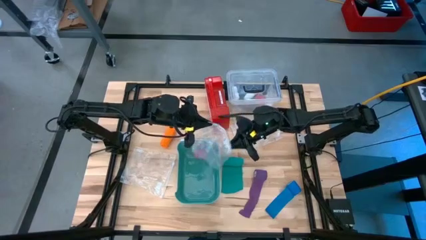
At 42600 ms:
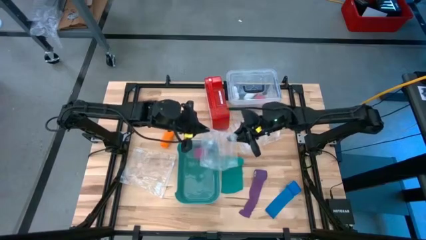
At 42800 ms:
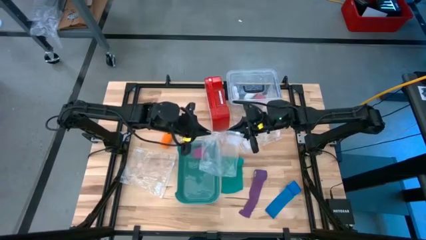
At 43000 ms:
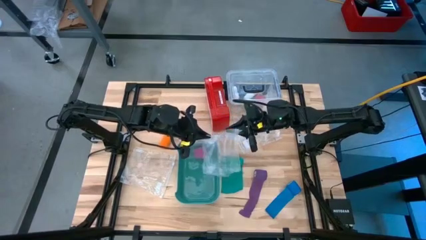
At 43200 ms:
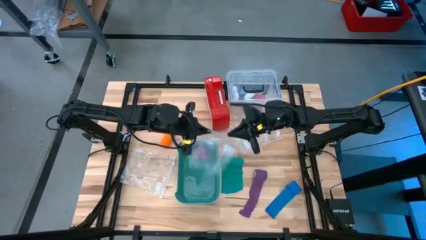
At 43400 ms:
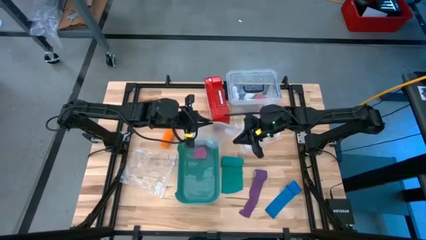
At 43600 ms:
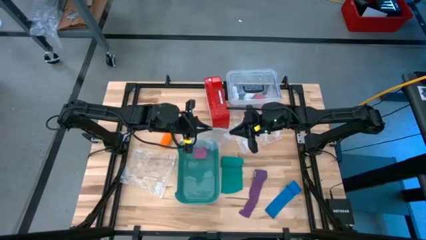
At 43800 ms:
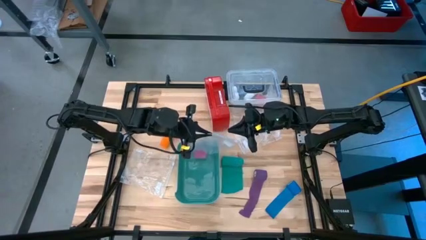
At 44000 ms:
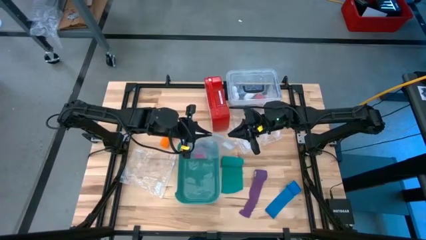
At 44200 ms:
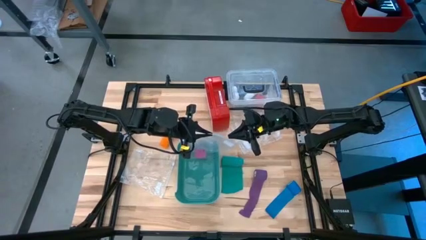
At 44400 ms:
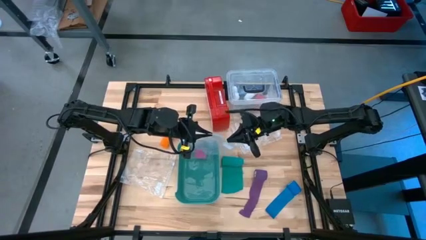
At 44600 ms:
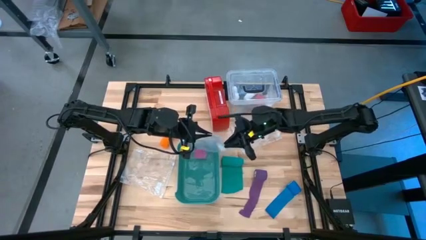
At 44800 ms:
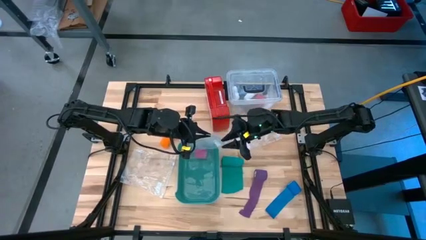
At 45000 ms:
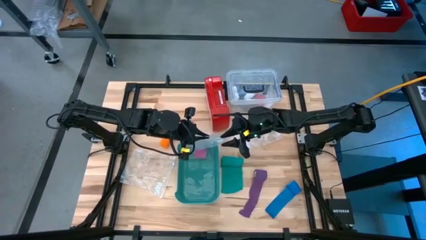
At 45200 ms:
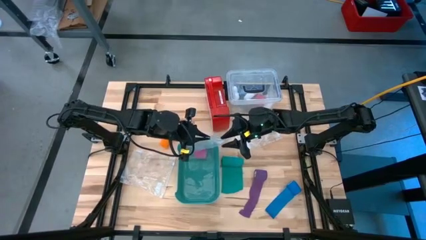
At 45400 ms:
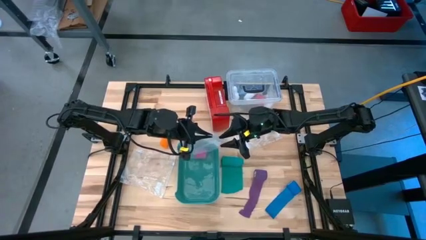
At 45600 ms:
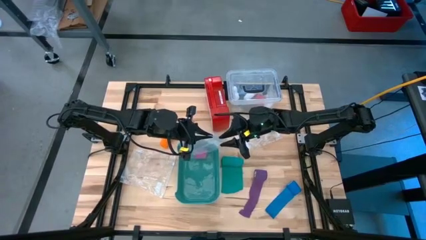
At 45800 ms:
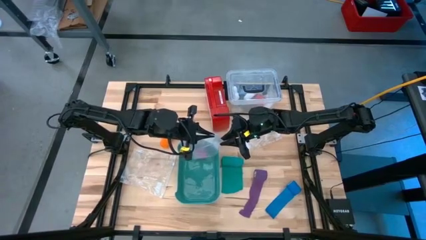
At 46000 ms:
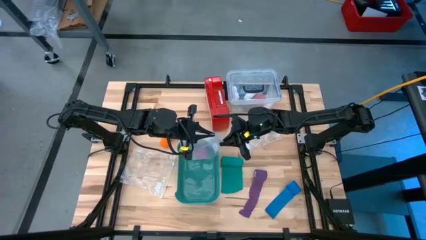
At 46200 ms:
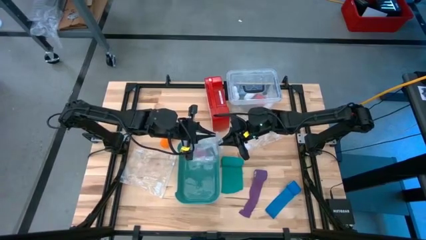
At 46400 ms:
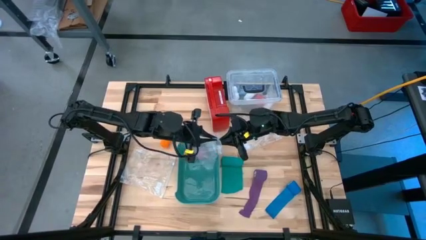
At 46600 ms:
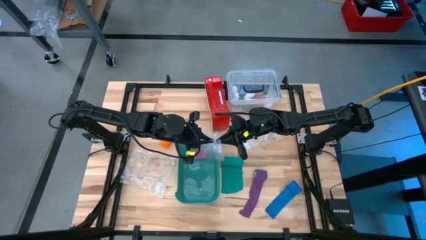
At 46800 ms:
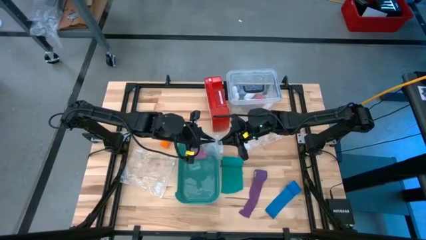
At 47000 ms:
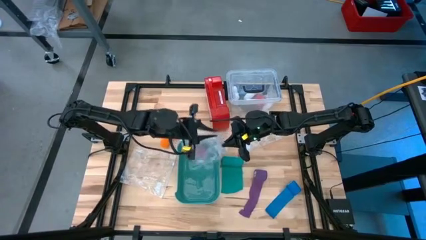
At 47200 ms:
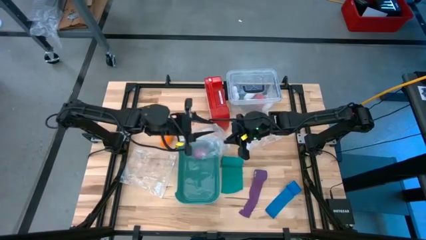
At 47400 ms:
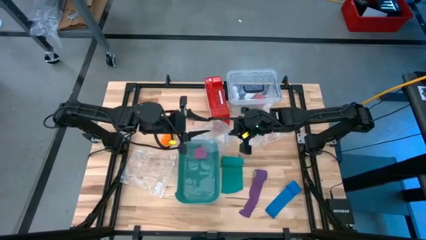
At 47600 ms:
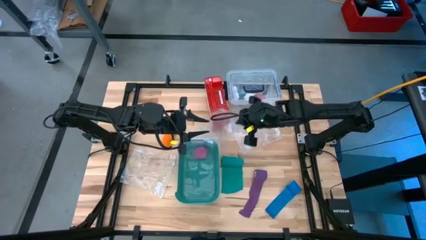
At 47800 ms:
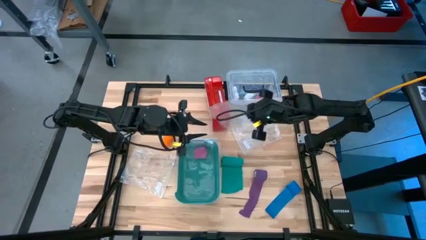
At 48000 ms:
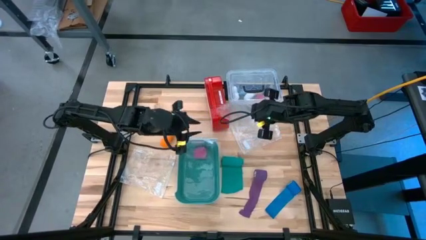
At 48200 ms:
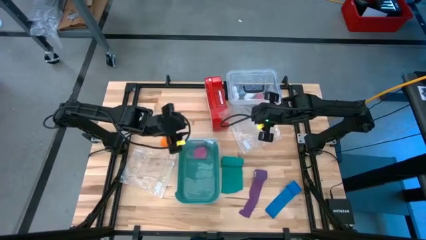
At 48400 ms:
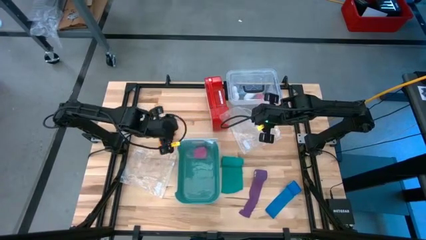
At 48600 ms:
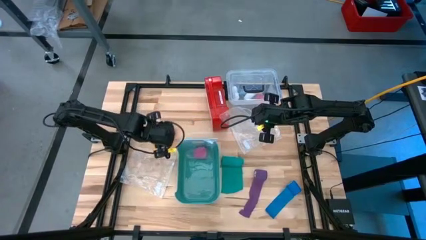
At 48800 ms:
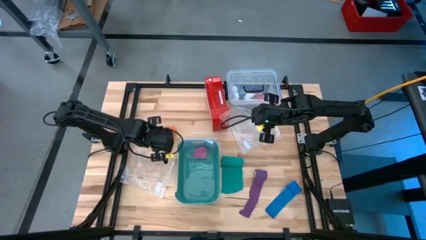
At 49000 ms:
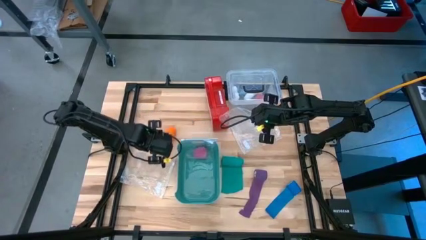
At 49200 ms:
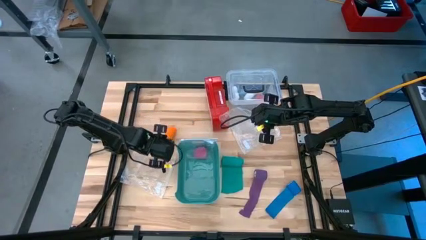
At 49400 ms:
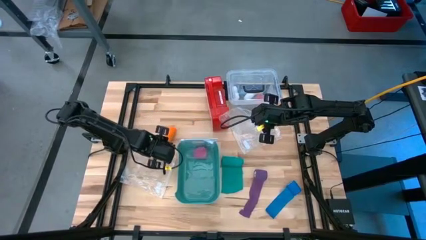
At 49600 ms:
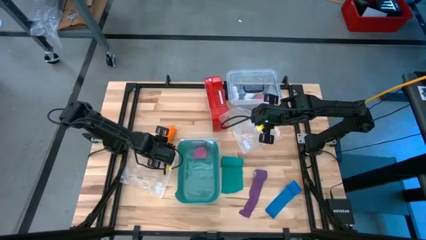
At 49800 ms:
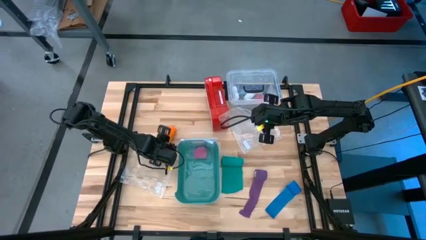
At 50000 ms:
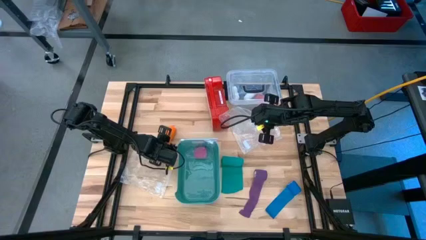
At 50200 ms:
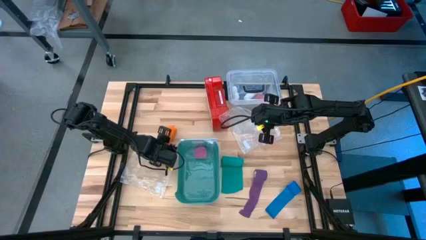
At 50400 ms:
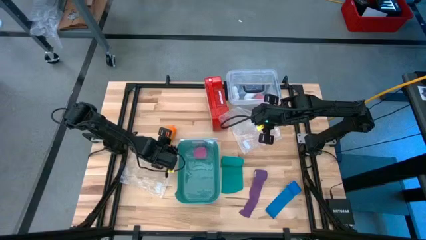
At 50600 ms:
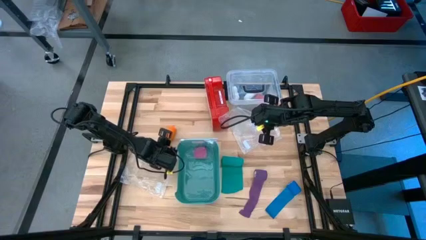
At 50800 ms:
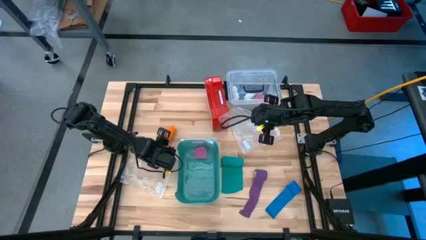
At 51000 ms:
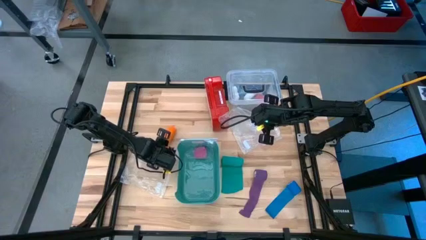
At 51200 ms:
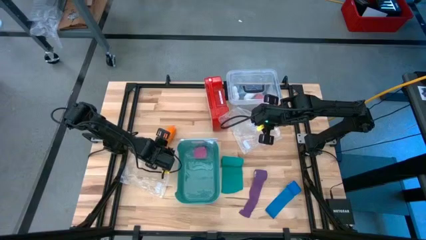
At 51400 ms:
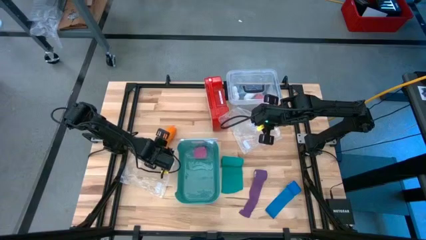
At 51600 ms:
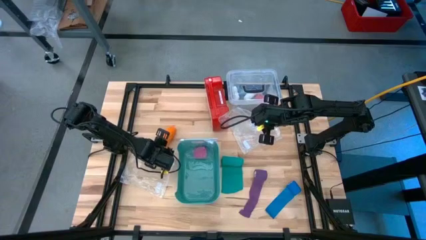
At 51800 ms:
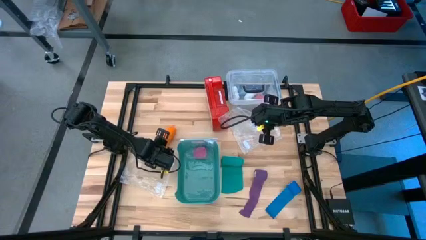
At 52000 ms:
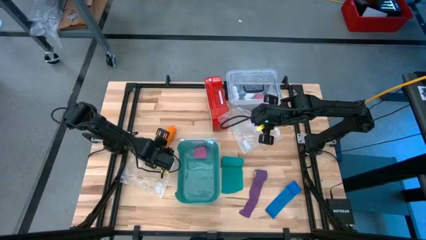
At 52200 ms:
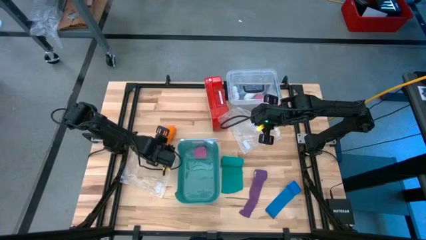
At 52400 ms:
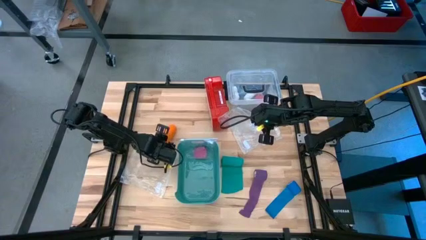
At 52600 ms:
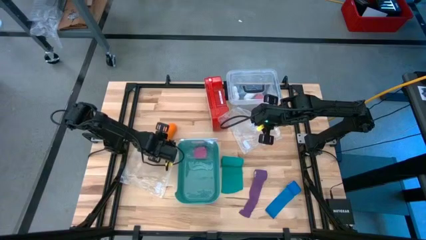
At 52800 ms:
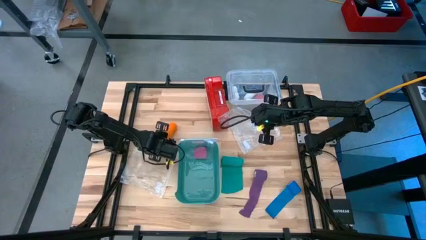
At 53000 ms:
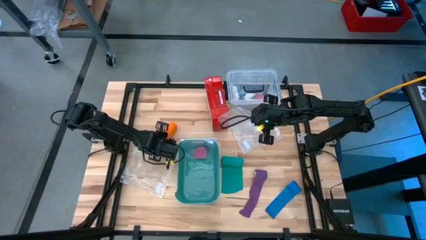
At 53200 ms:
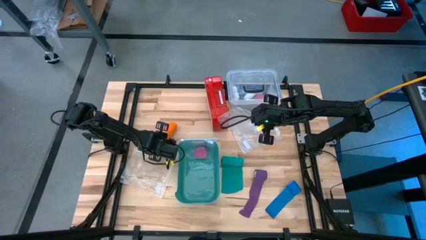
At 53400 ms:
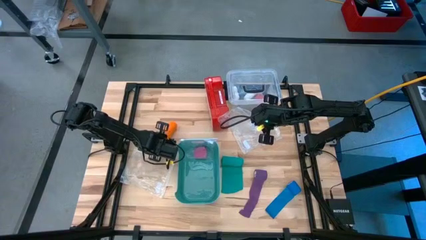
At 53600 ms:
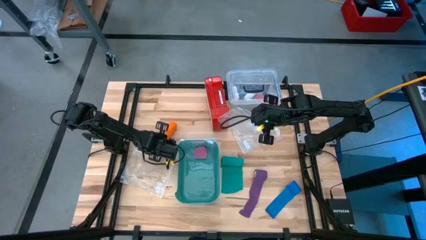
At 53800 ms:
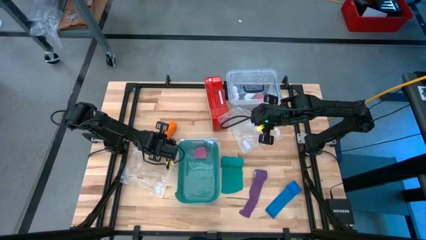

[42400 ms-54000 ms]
Task: Roll bandage
Put the orange bandage into the transparent zip bag

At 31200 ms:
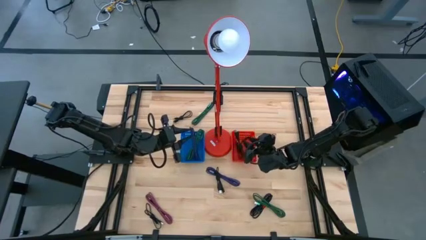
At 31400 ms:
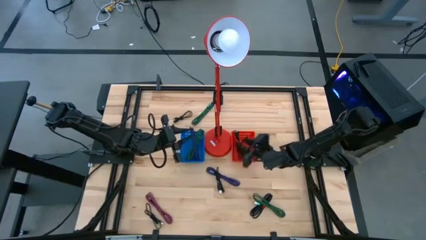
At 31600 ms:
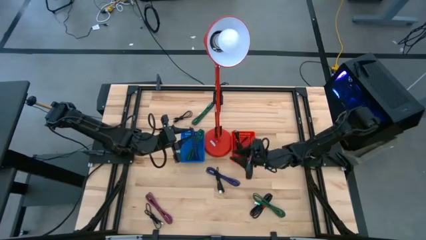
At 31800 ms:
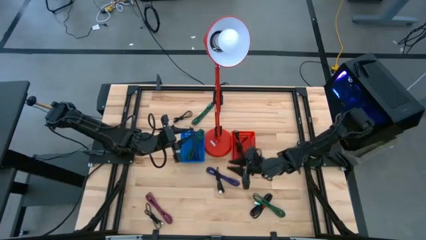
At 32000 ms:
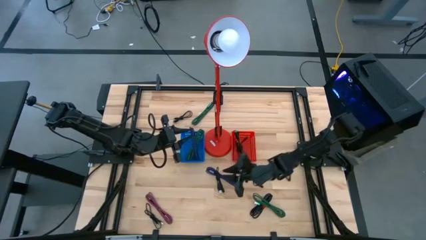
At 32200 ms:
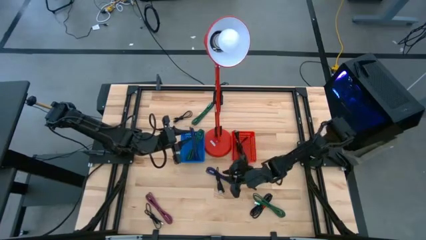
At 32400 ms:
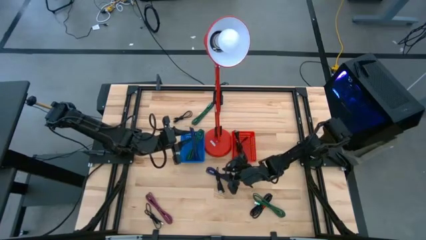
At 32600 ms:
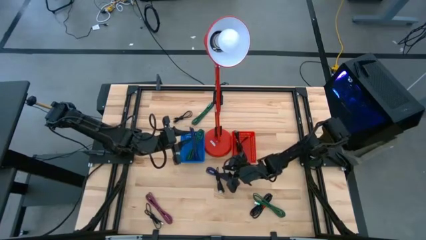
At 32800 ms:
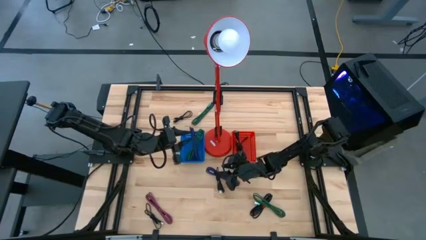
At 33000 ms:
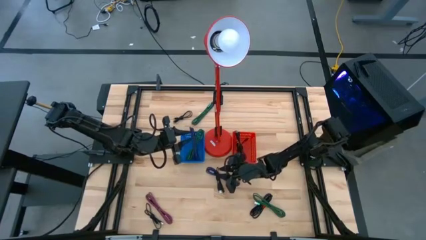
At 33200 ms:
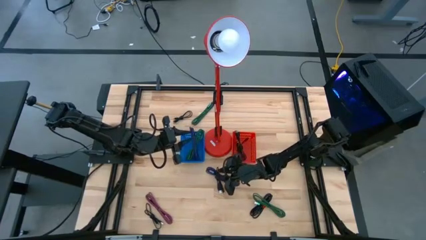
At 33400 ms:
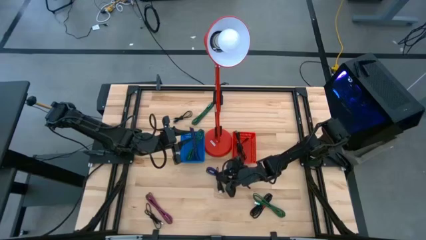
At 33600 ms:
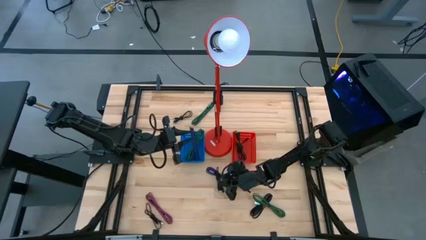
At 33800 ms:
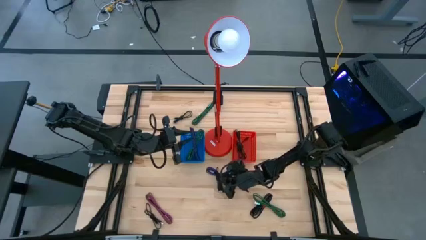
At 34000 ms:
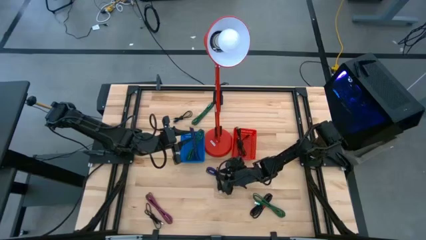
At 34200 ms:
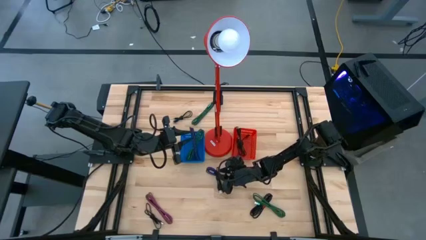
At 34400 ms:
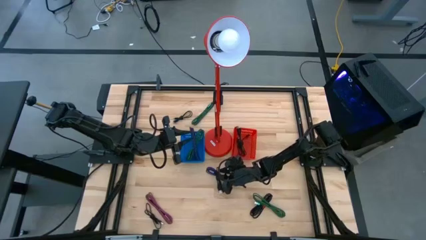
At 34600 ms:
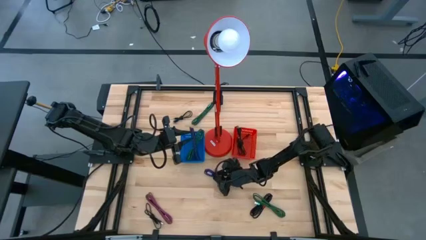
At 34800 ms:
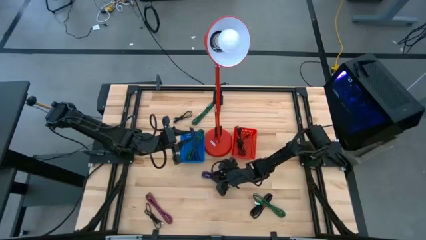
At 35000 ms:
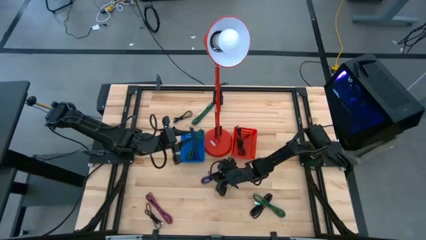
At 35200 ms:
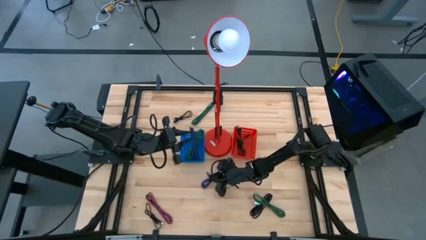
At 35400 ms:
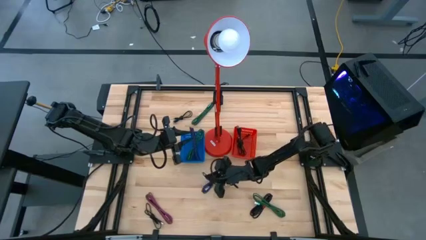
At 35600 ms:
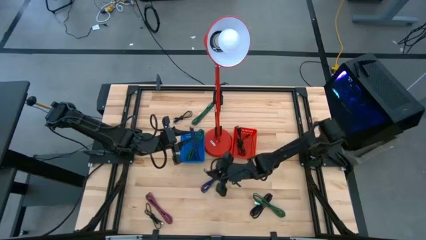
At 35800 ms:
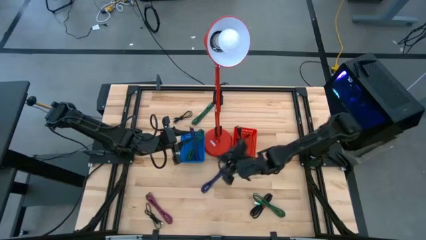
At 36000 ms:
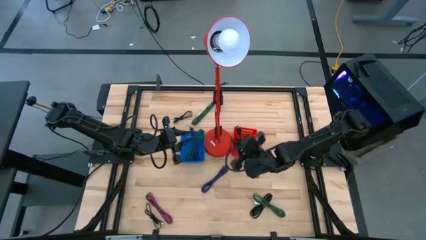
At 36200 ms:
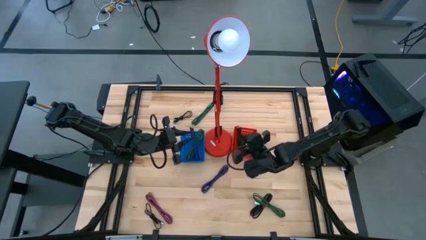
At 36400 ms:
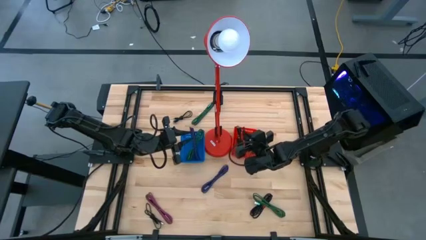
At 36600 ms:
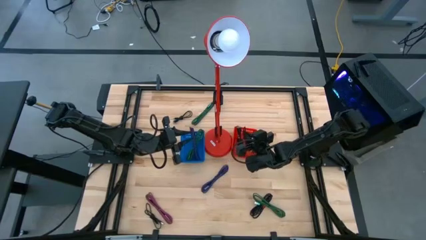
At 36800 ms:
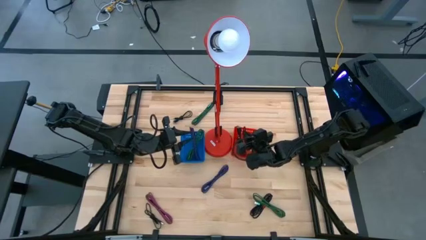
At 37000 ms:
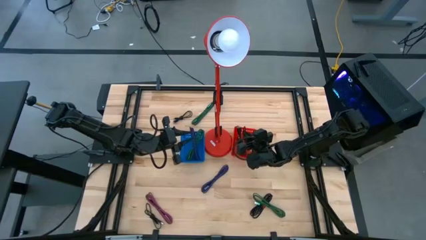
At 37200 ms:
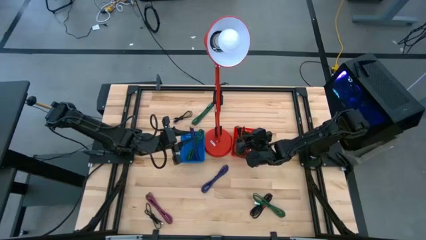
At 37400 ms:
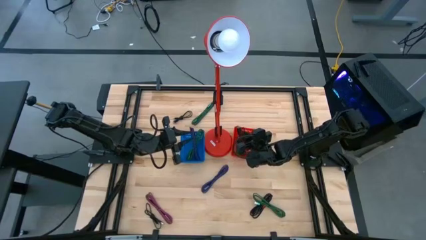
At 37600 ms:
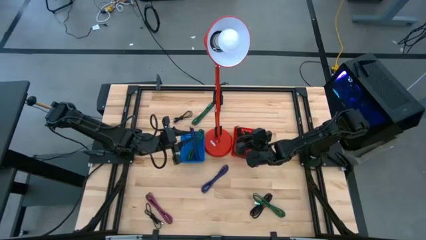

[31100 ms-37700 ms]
Task: Pick & Place USB Port
Put the black charger cable into the orange bin
